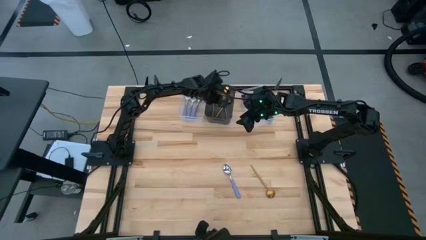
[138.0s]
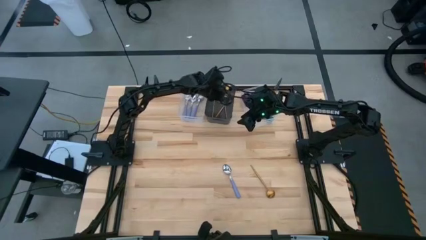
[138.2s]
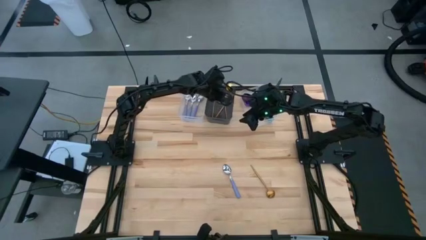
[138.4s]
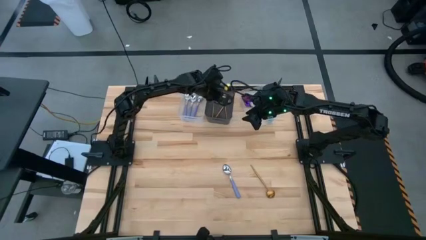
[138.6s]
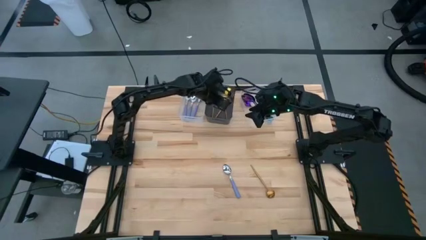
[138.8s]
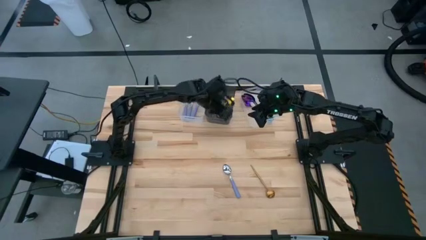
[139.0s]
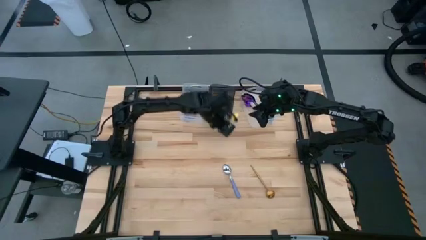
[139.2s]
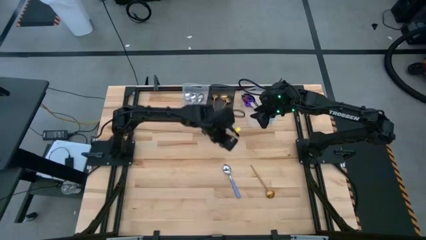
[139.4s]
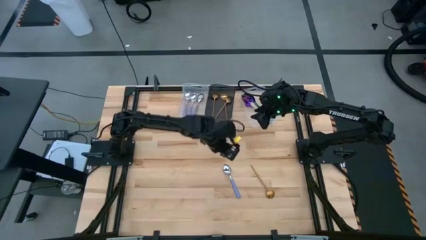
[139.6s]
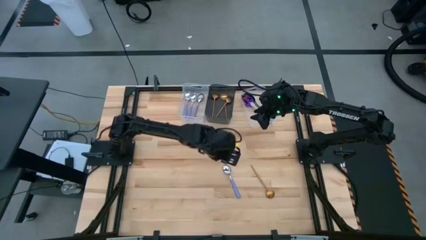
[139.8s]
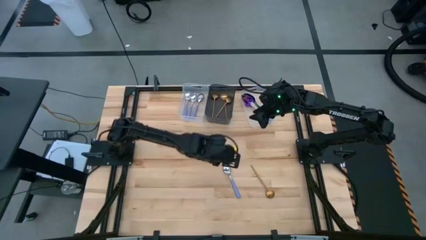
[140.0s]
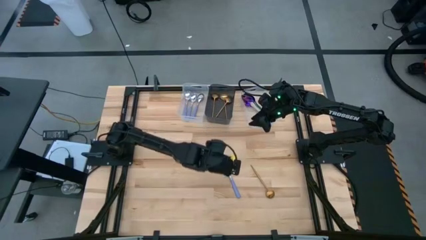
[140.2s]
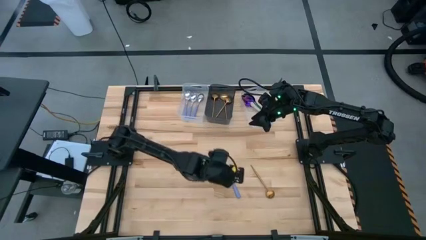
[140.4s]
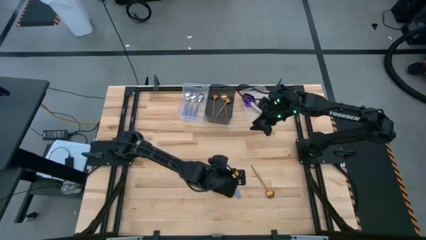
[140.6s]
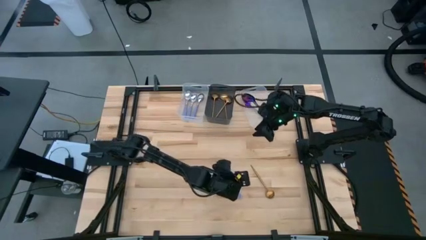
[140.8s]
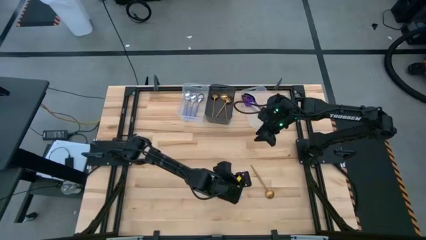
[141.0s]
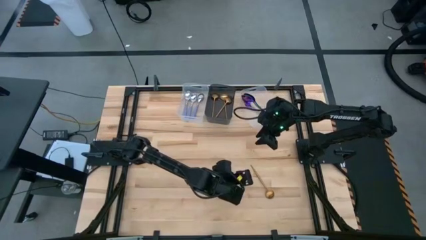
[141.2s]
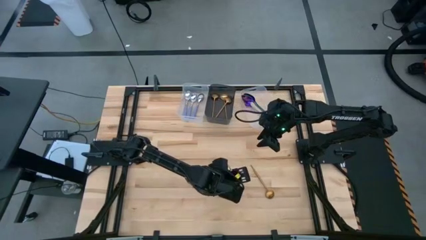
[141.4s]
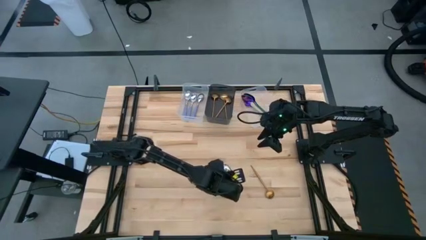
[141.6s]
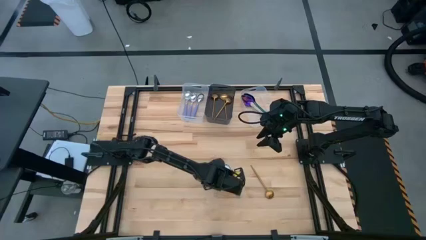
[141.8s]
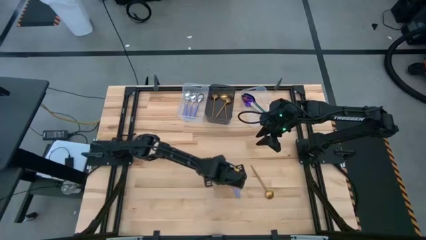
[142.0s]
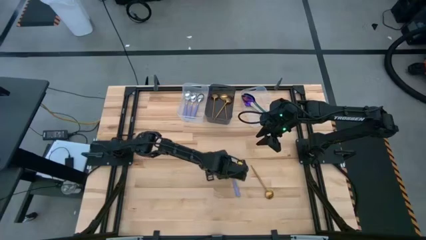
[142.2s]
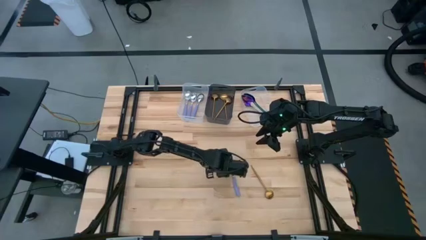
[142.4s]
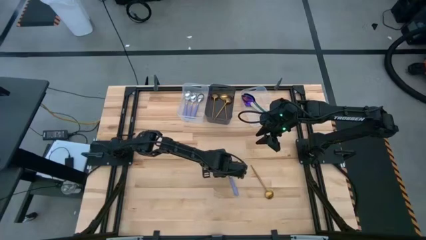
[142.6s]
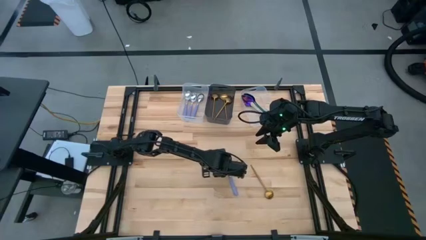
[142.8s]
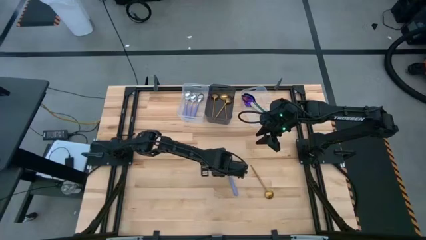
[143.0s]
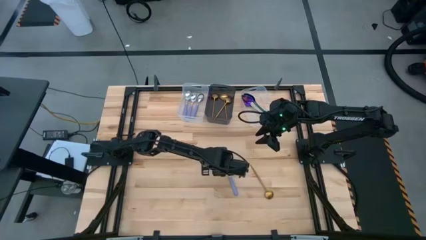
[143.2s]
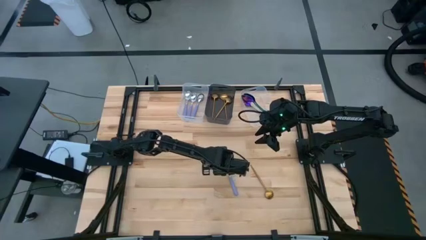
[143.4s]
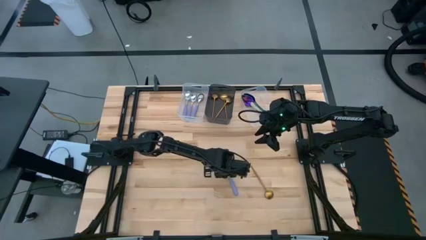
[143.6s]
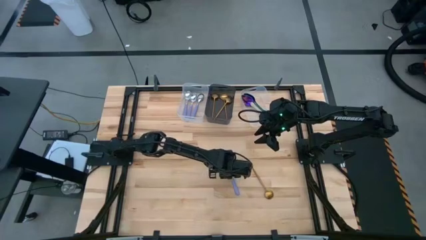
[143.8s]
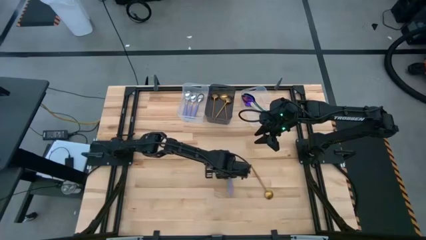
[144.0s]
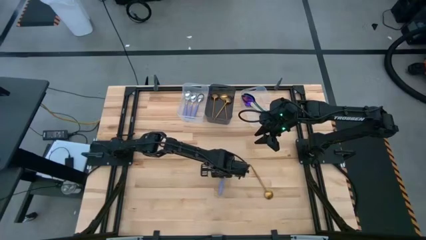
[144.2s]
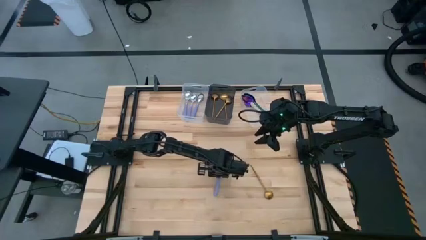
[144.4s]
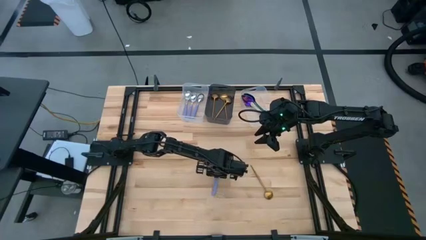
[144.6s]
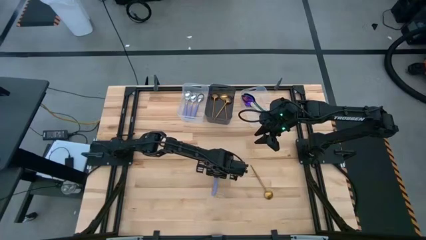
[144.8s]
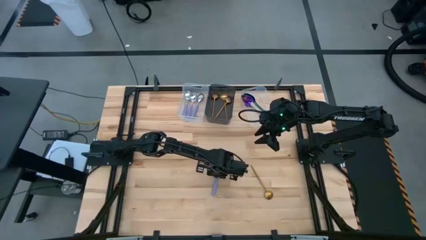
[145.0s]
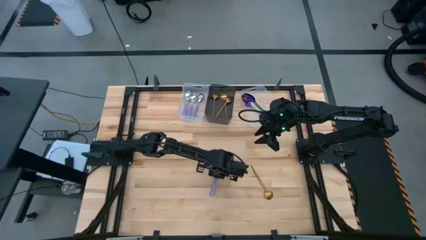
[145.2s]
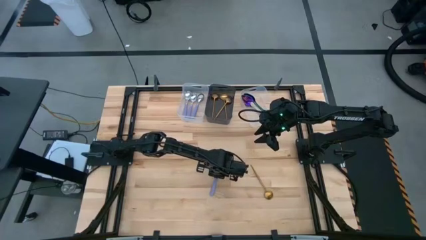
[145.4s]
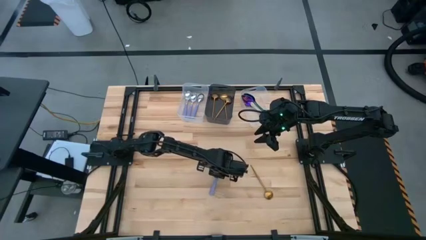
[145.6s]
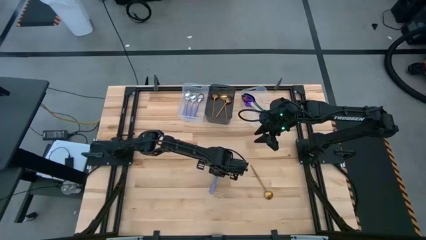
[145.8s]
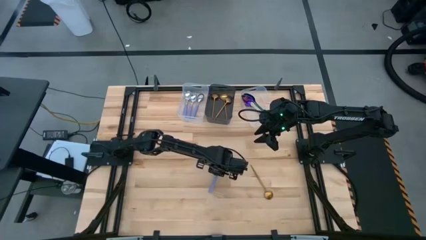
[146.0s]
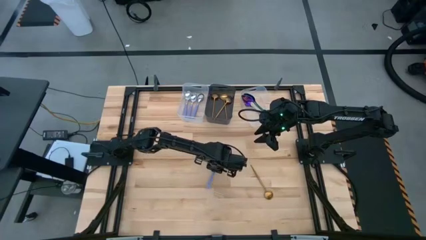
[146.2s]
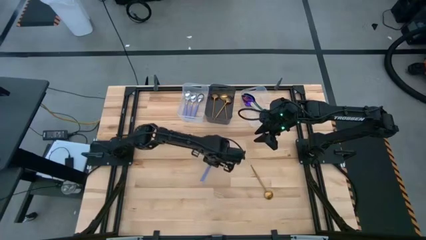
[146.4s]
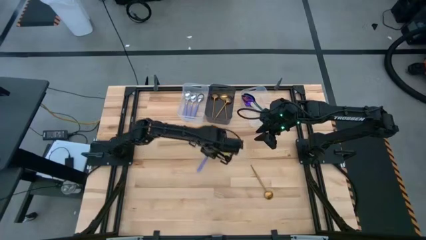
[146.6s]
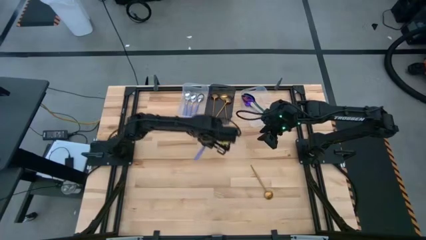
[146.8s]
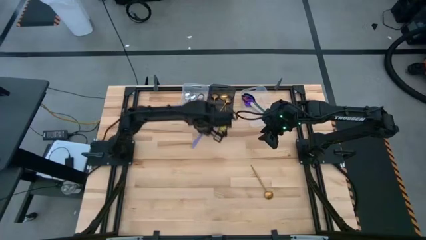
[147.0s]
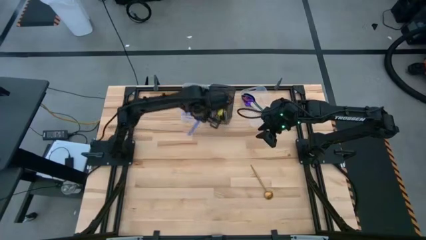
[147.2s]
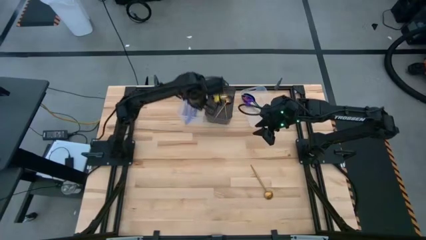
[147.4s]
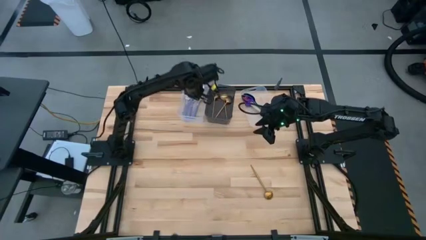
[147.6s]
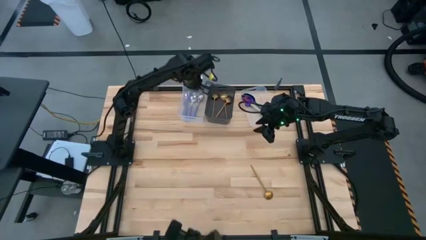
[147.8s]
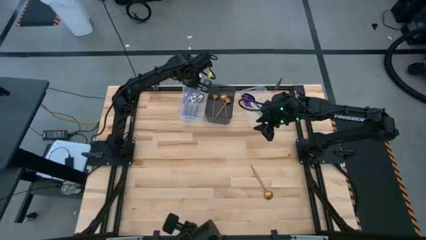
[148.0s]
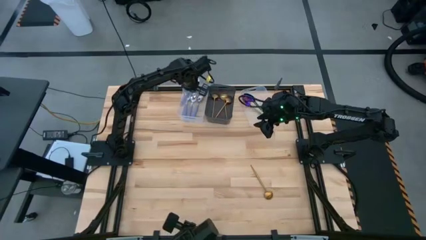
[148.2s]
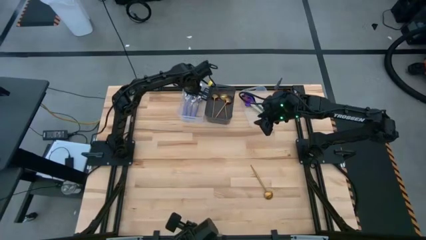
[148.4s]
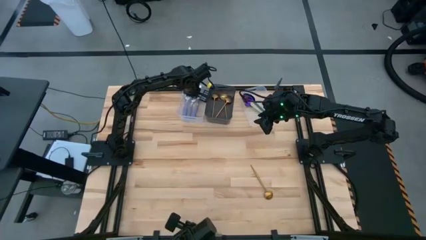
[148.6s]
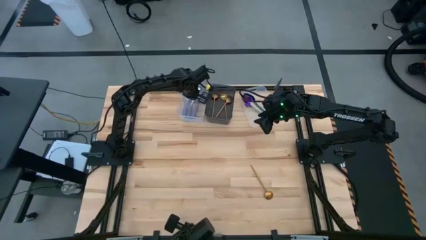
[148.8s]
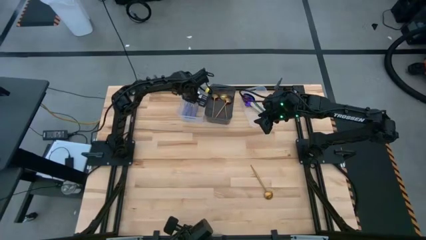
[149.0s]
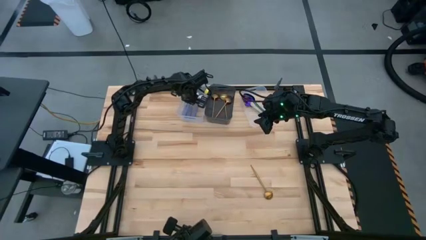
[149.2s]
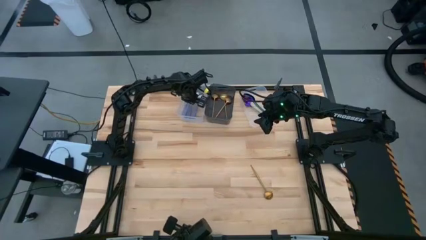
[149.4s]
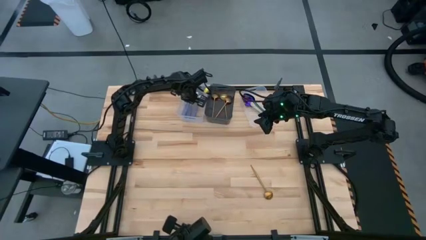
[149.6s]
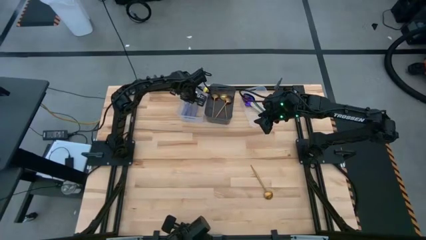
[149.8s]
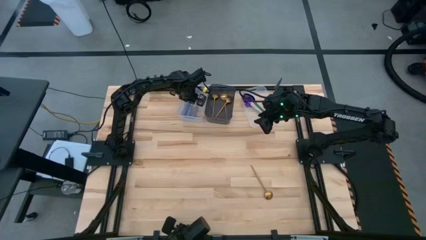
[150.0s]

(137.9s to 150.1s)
Task: Sort silverware by color (type)
Put the purple spoon into the left transparent bin
